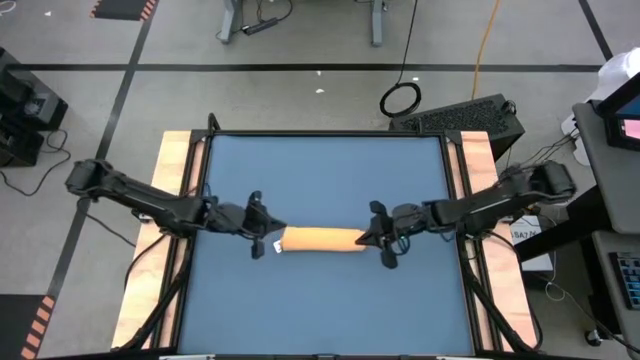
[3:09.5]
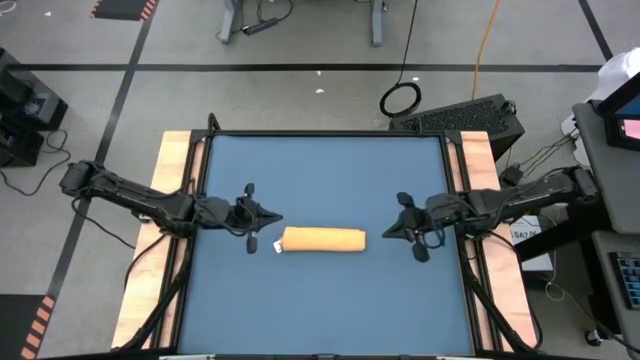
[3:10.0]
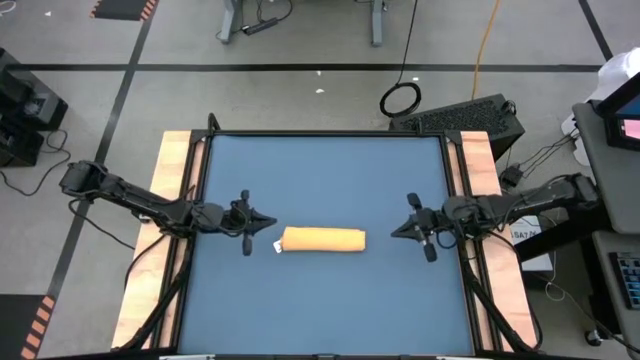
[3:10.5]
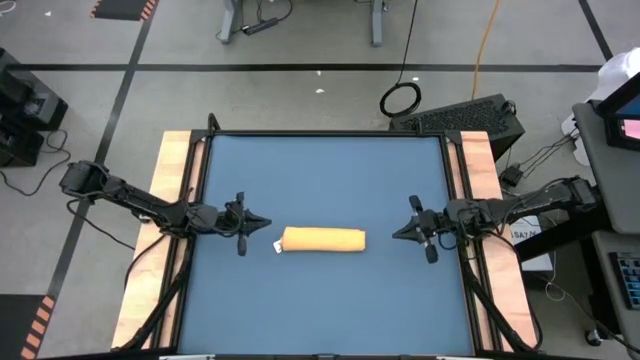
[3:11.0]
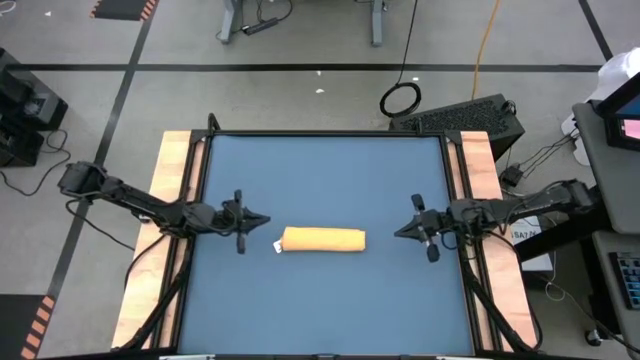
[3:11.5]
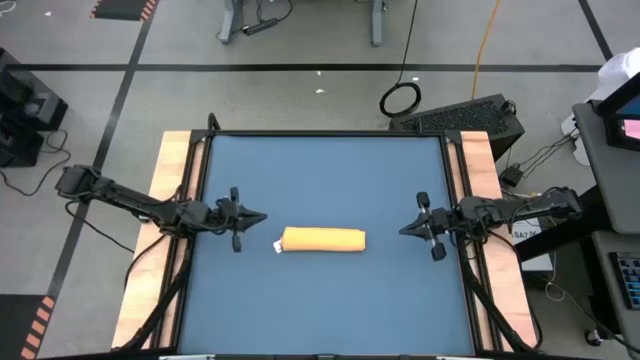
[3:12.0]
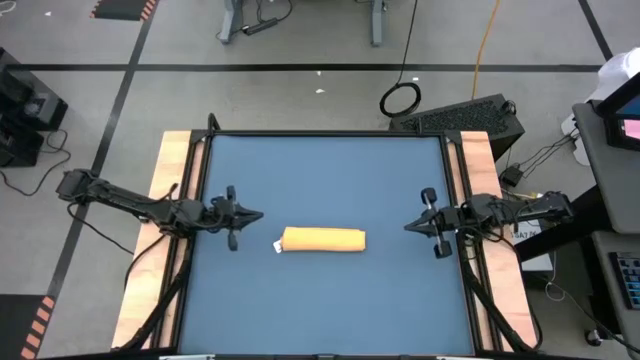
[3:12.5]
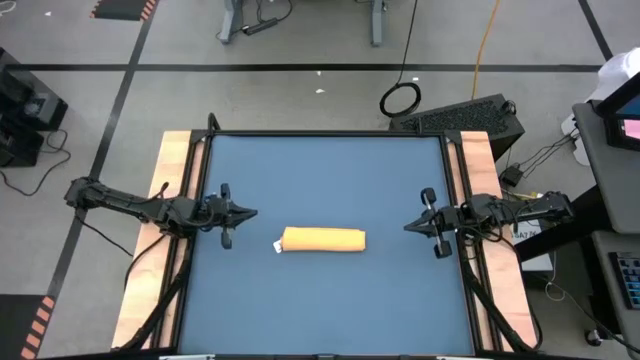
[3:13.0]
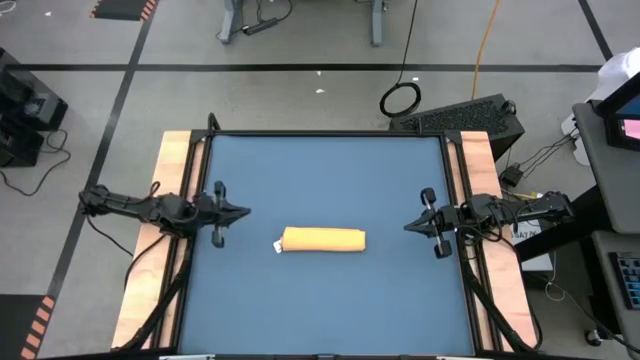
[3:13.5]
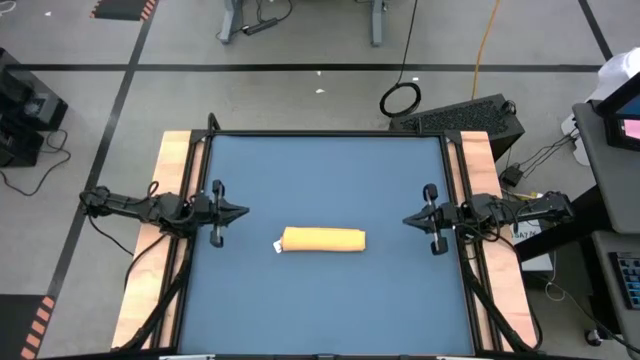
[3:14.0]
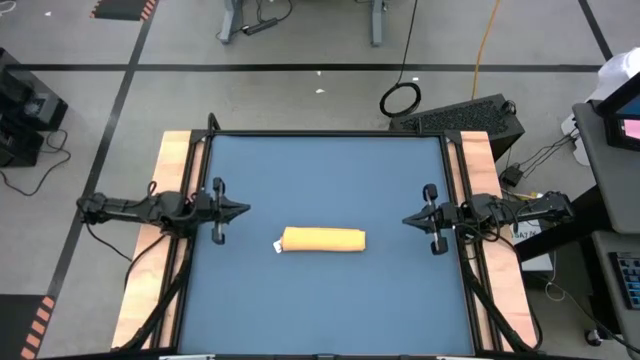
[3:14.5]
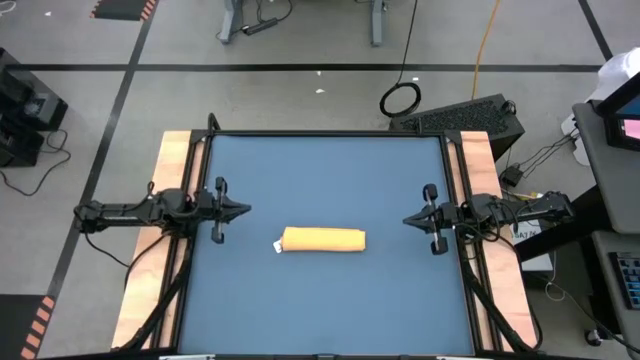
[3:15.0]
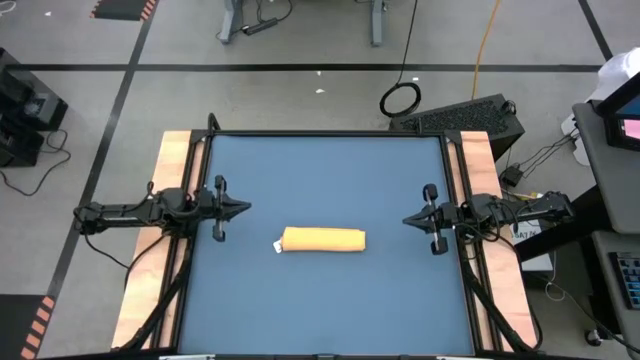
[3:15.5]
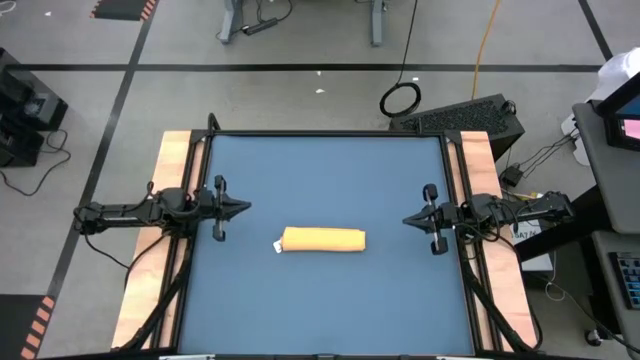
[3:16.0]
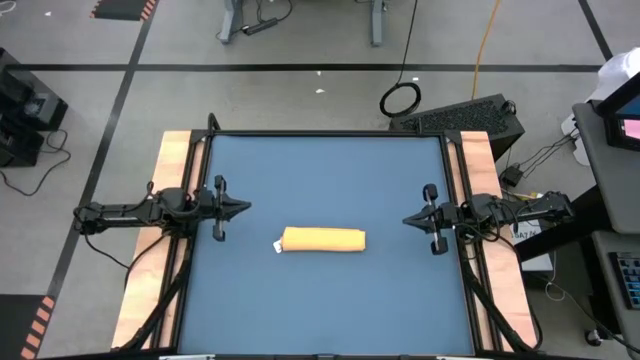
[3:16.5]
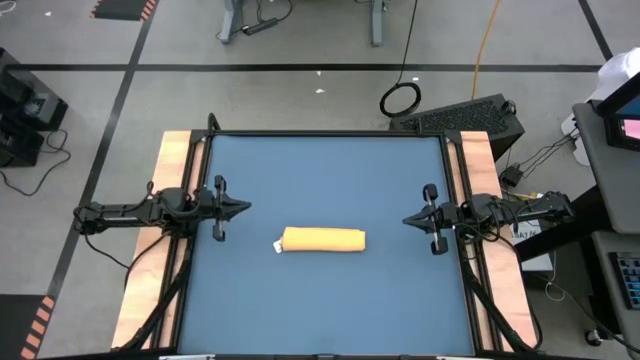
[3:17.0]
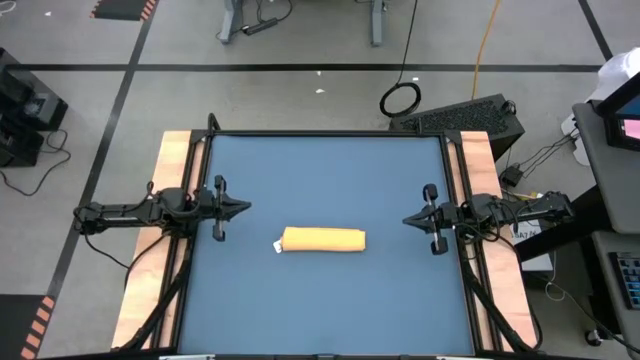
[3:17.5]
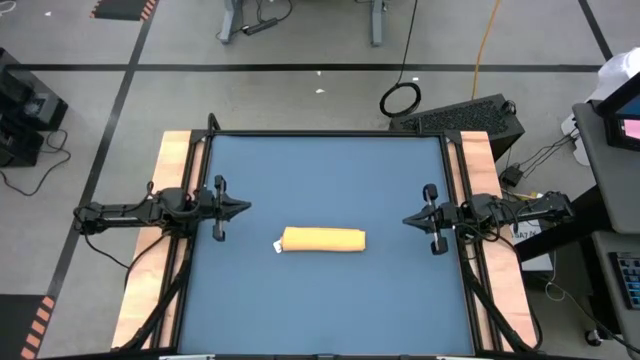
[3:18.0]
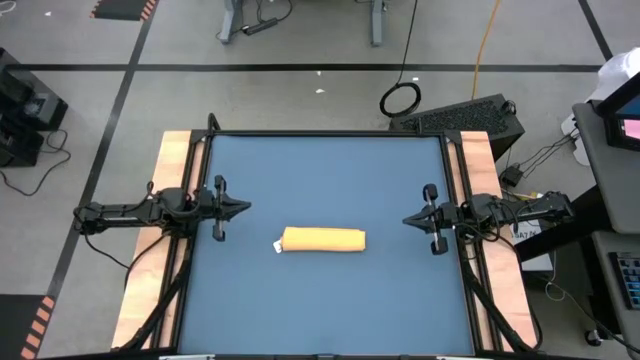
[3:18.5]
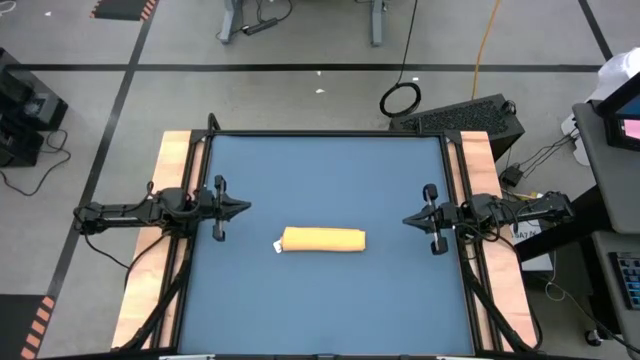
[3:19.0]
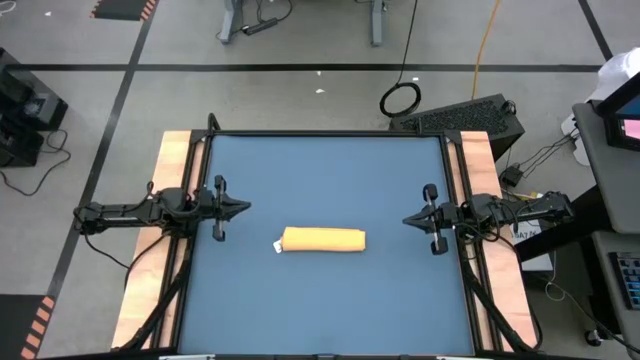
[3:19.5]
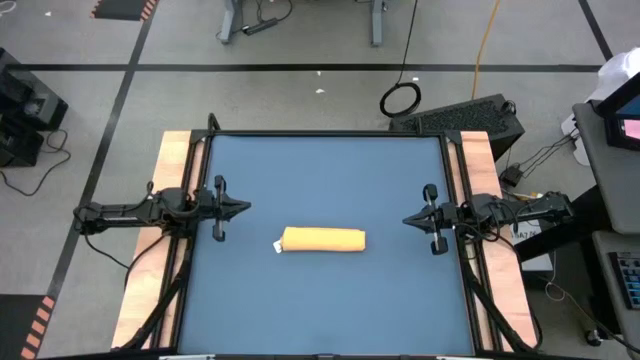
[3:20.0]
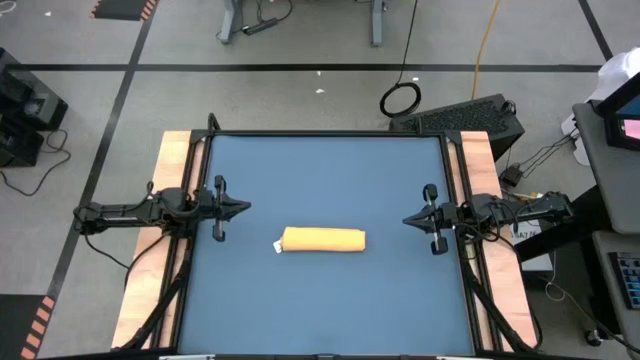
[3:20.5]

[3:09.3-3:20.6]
Task: Roll towel
Return to Home Position

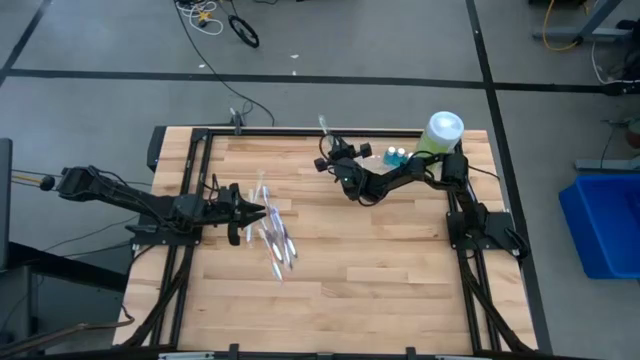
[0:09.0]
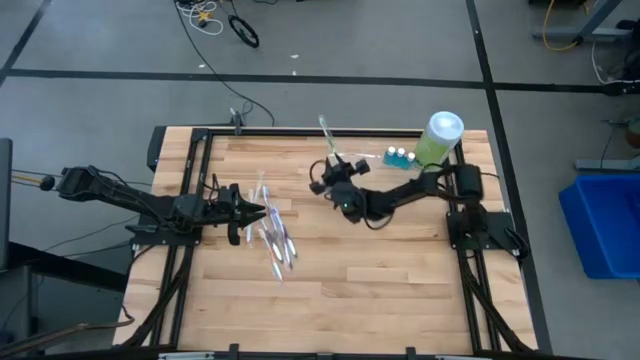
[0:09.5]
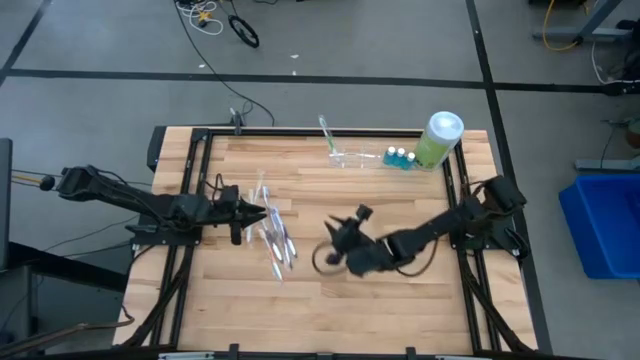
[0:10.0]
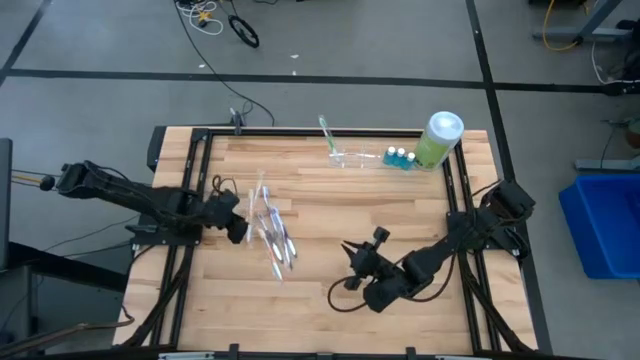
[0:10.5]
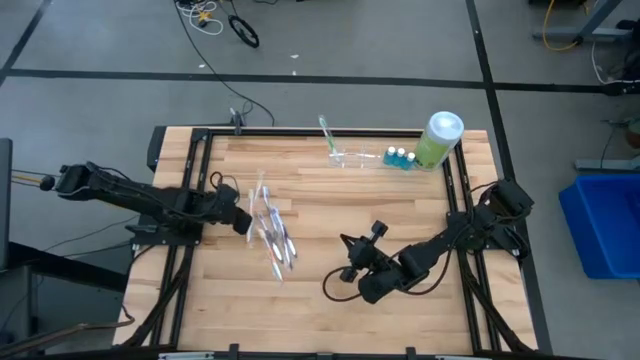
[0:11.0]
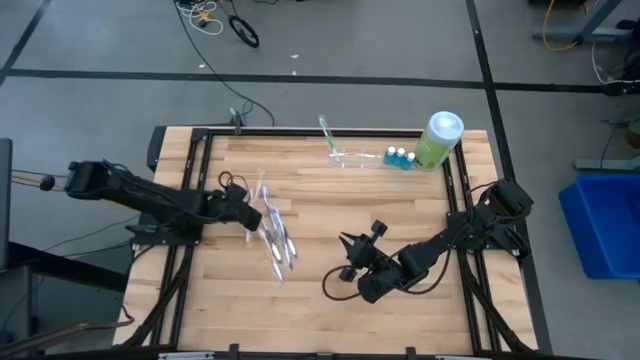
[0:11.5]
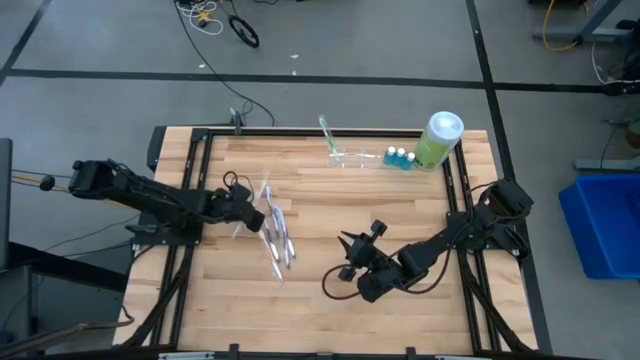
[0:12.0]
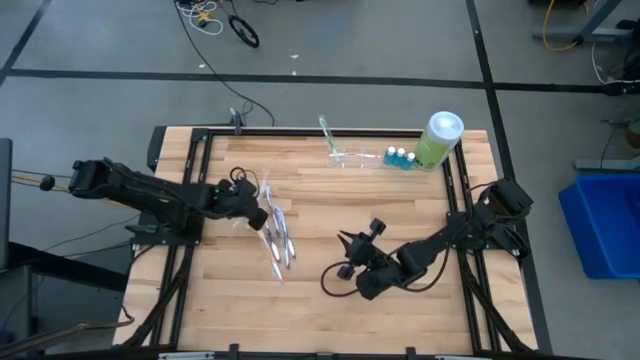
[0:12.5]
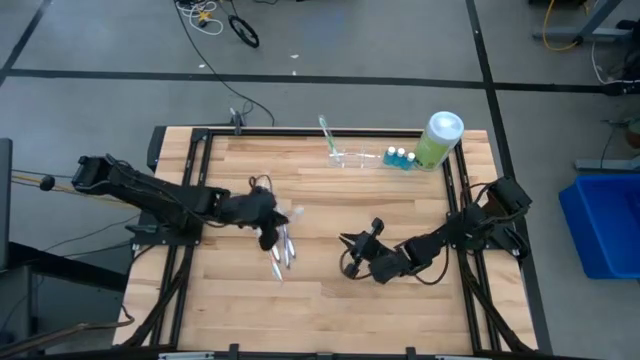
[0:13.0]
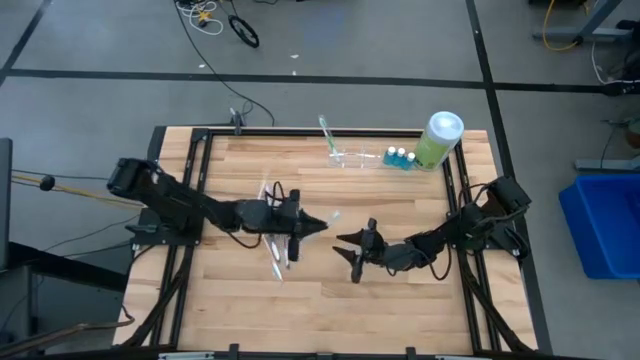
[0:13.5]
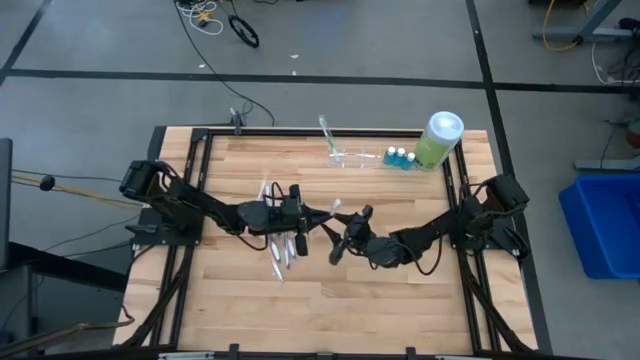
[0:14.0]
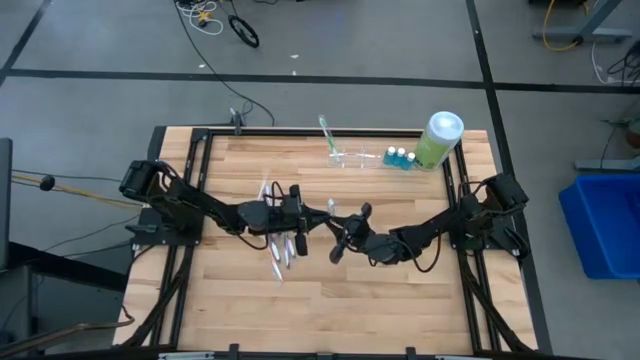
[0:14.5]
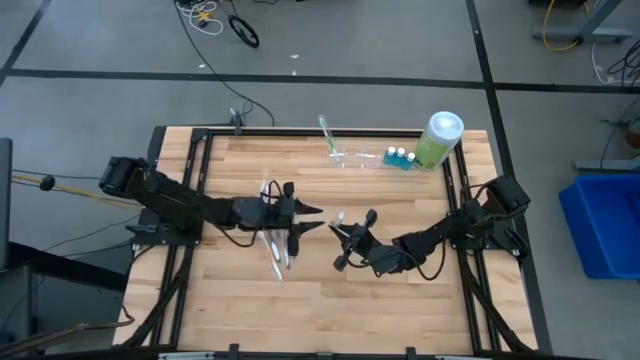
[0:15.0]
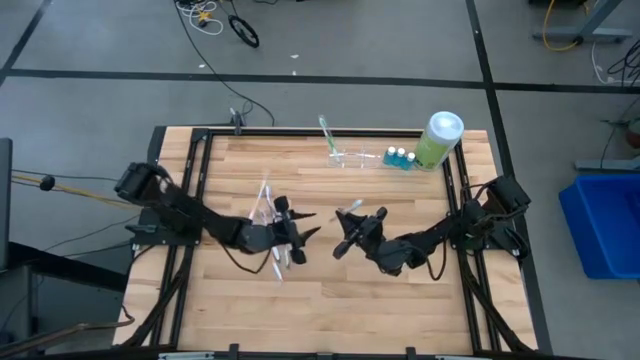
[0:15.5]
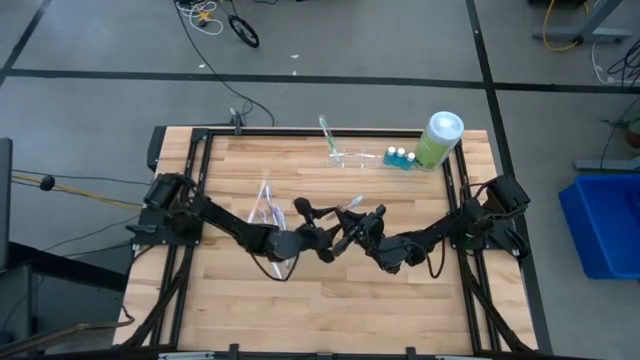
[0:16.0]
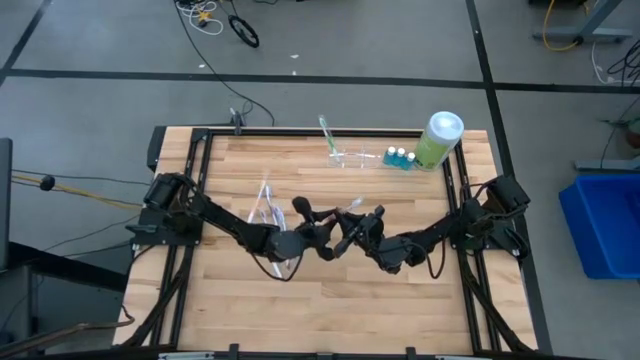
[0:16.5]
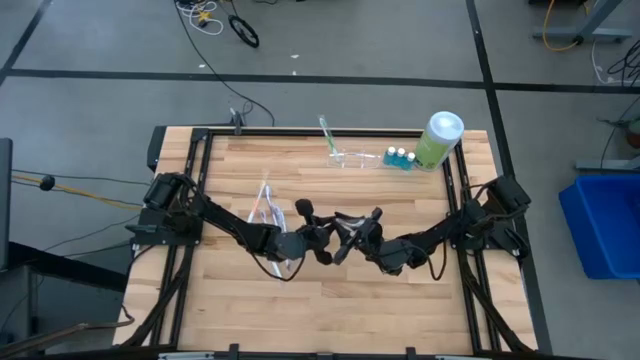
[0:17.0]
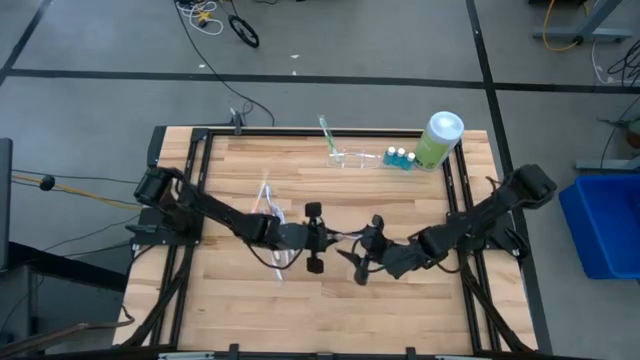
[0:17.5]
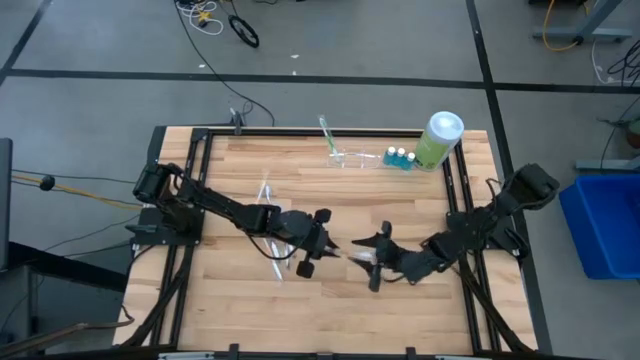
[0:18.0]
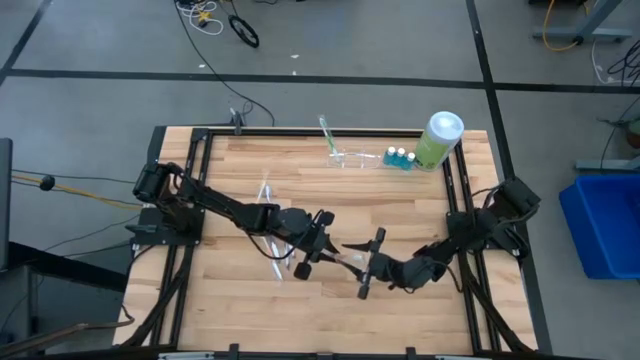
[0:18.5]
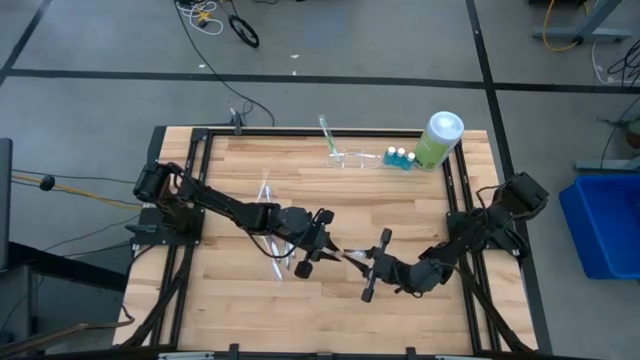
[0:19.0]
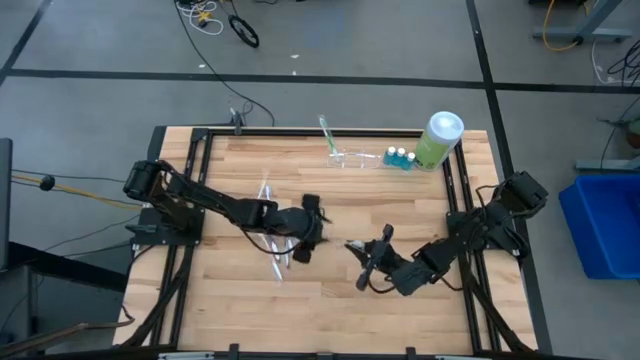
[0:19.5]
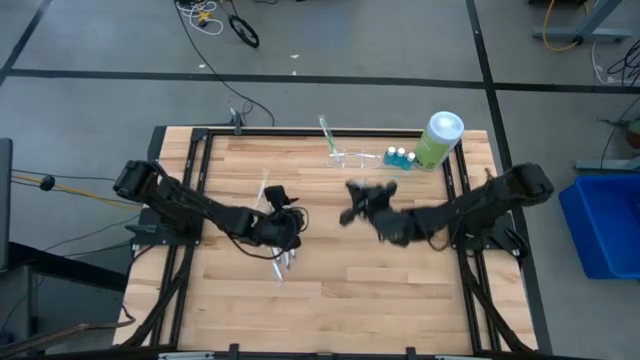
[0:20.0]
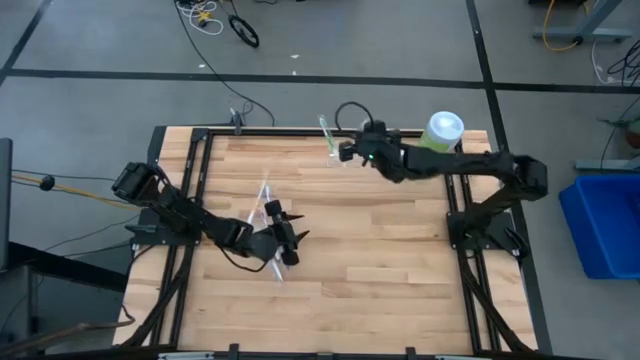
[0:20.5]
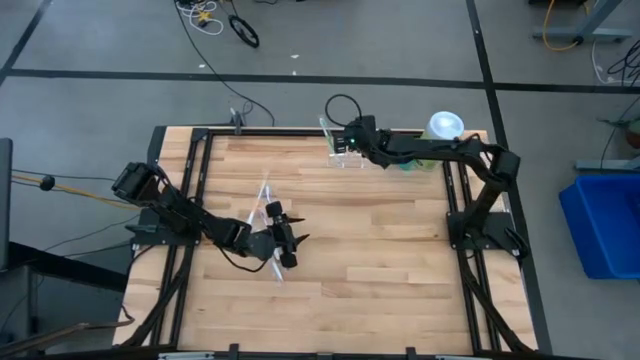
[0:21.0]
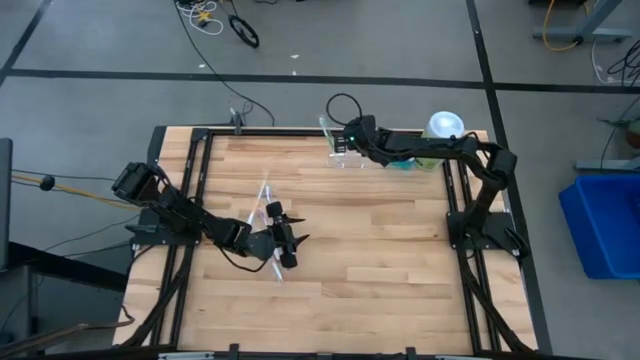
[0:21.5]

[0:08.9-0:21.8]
Task: Pick & Place toothbrushing station
Put the middle orange toothbrush into the middle section of the transparent organizer
